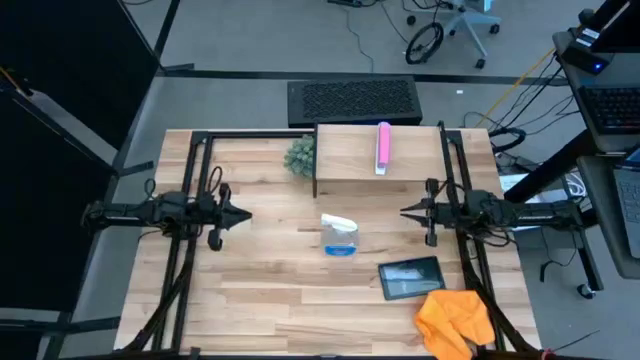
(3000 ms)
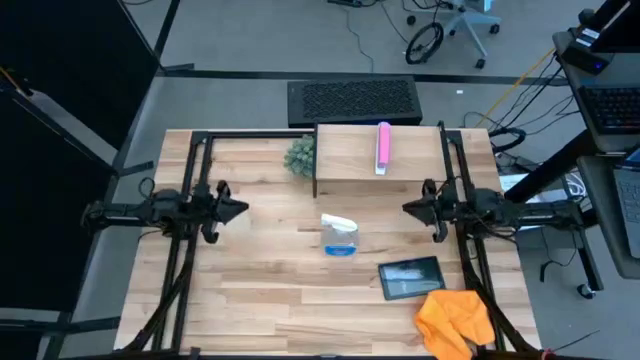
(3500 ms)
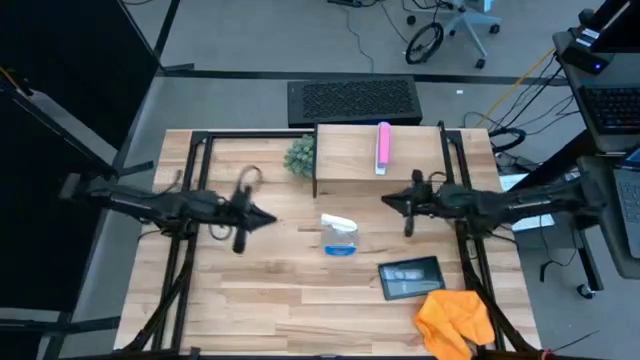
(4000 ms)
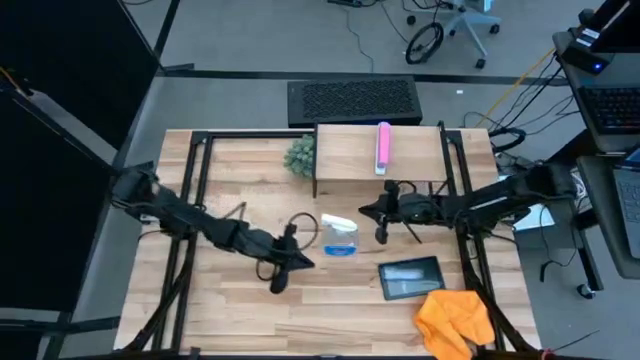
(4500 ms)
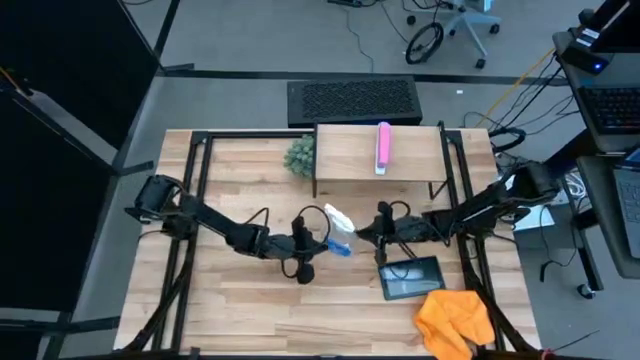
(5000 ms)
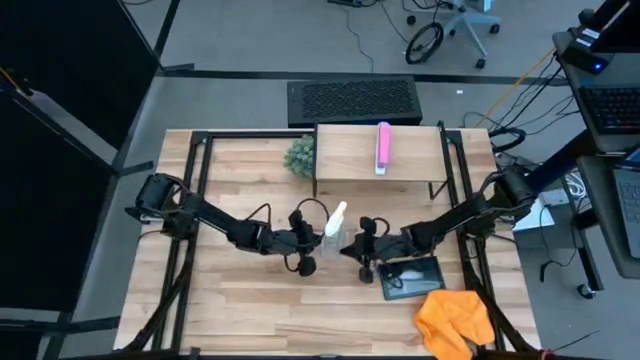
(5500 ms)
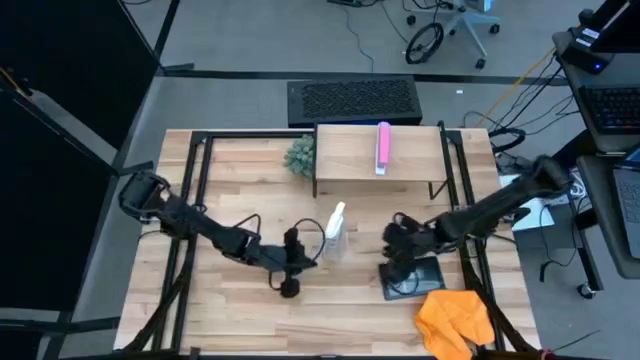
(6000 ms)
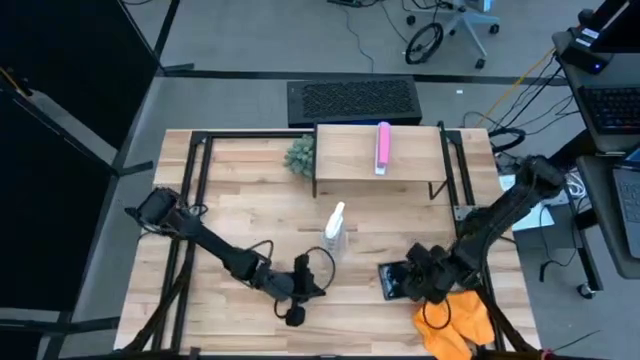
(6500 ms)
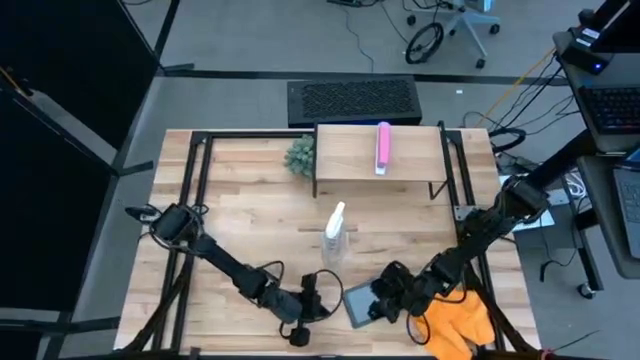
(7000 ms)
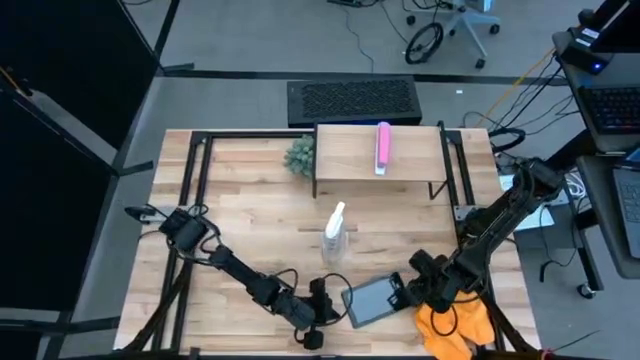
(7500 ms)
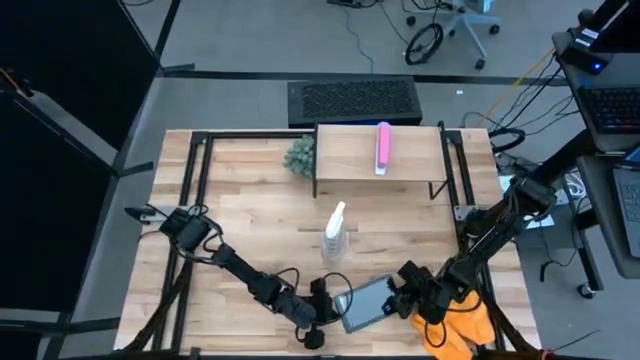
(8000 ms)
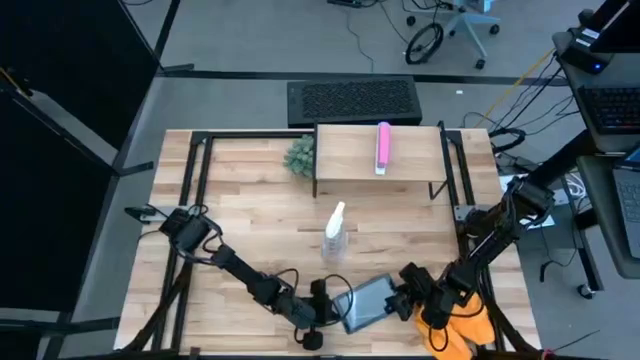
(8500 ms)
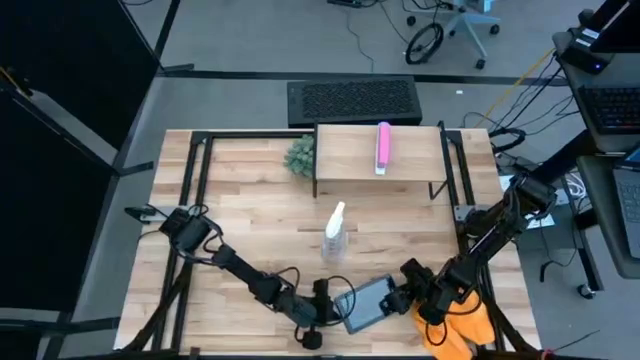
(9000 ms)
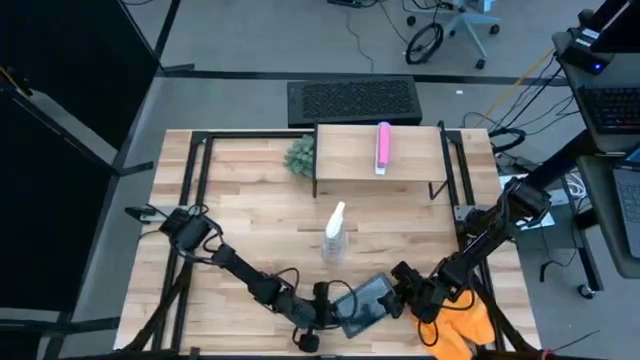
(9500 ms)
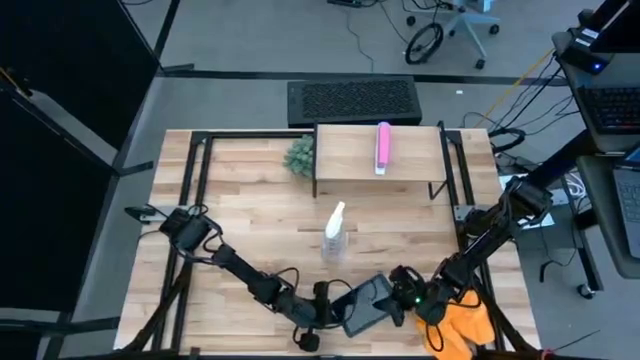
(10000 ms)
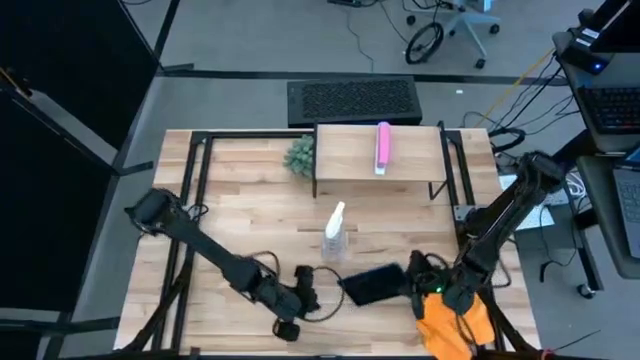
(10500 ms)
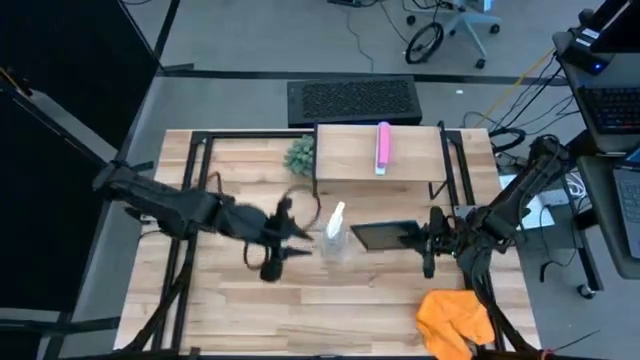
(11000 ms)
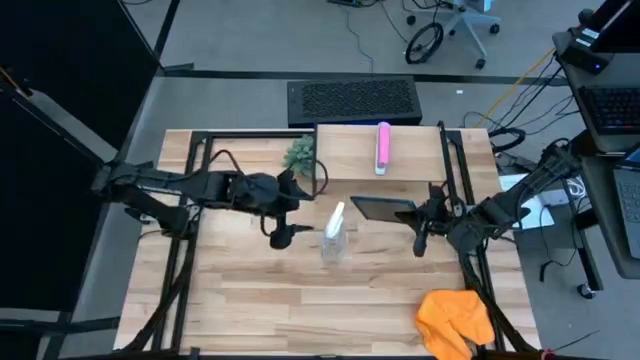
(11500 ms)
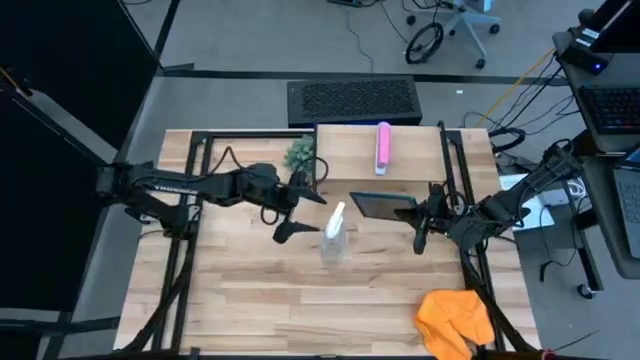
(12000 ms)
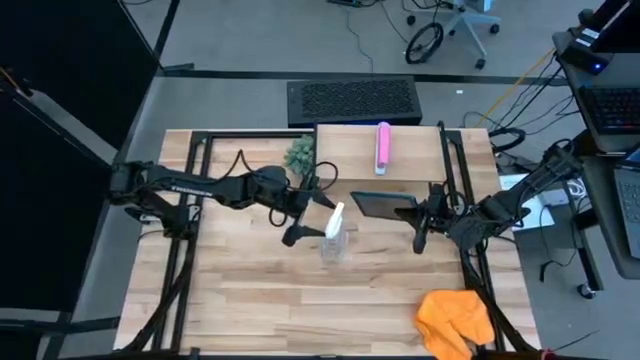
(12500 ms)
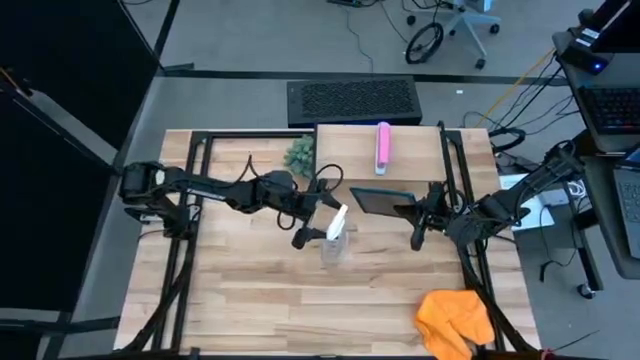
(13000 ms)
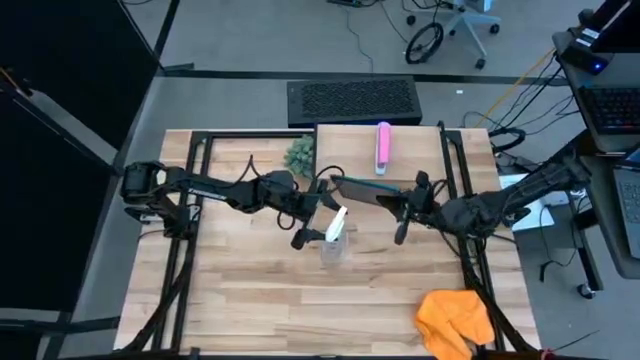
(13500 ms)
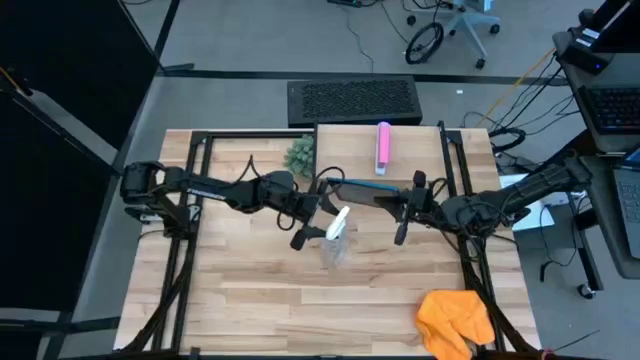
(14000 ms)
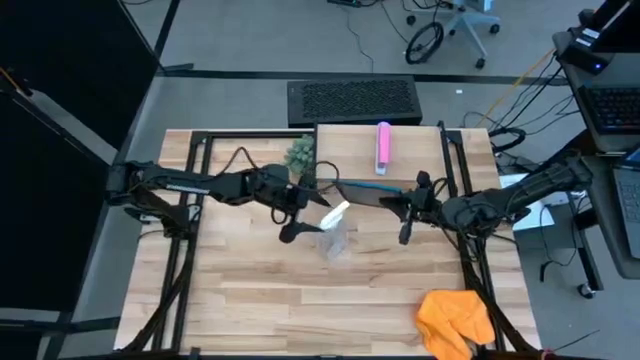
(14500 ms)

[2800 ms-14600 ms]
Task: Apply microfiber cloth
Spray the blue tablet using the spray bottle

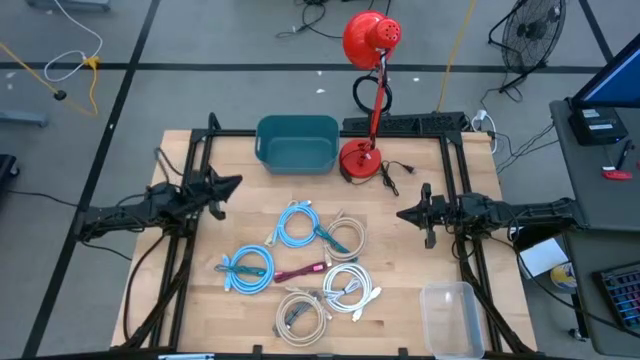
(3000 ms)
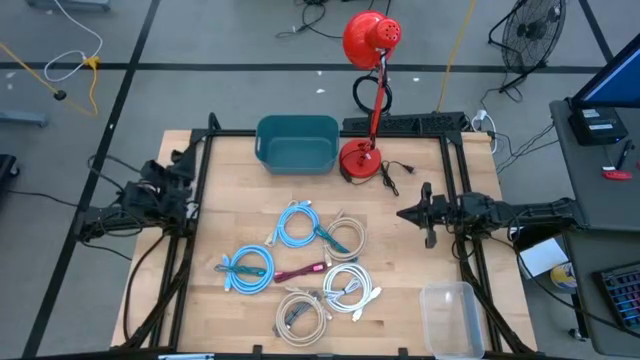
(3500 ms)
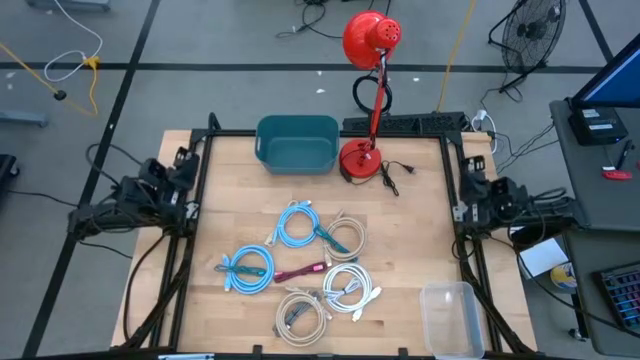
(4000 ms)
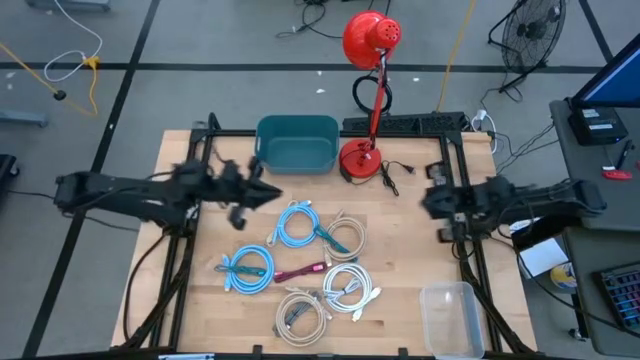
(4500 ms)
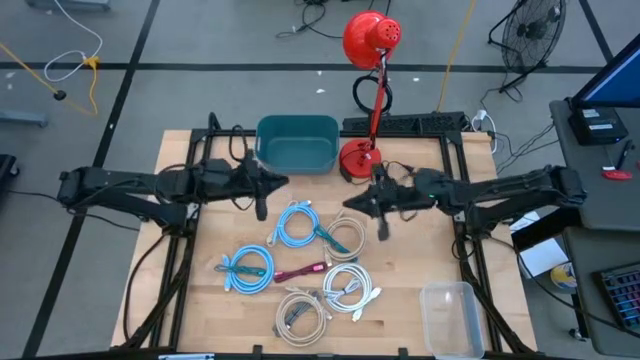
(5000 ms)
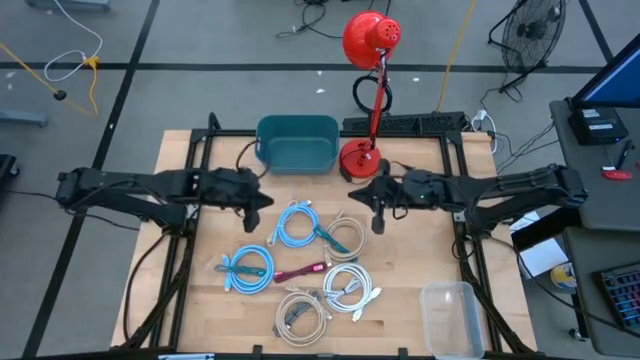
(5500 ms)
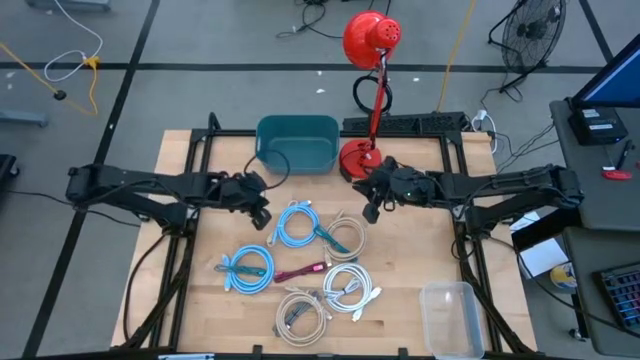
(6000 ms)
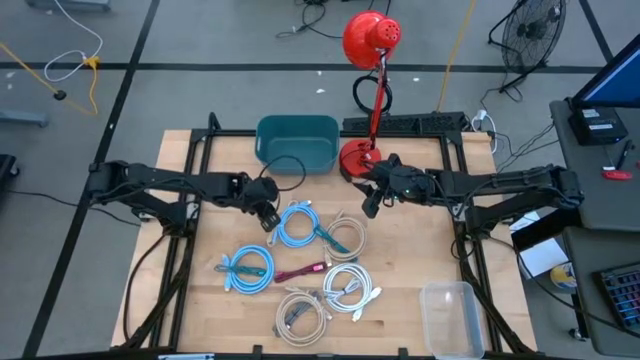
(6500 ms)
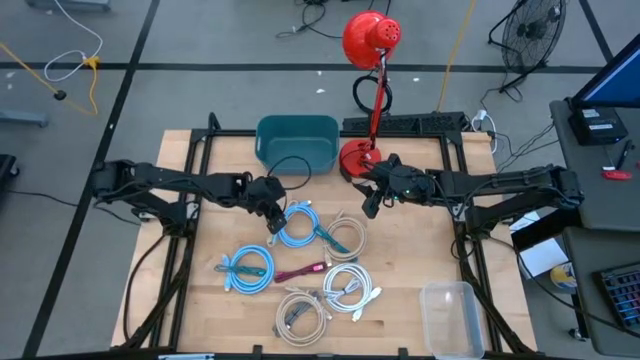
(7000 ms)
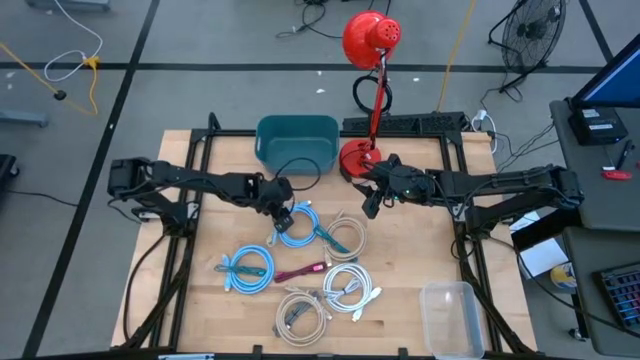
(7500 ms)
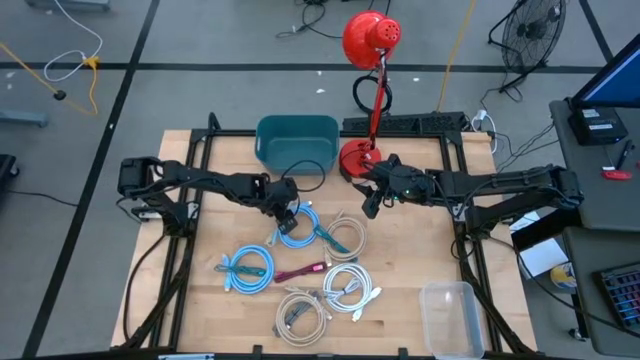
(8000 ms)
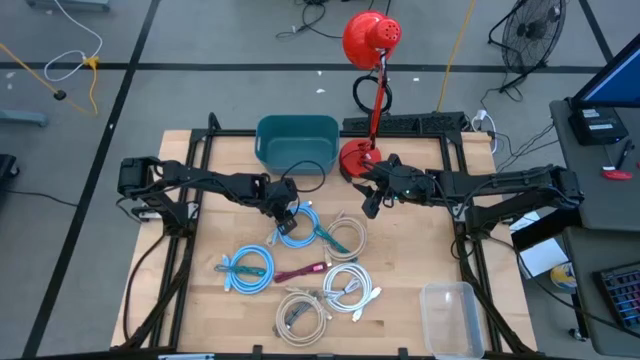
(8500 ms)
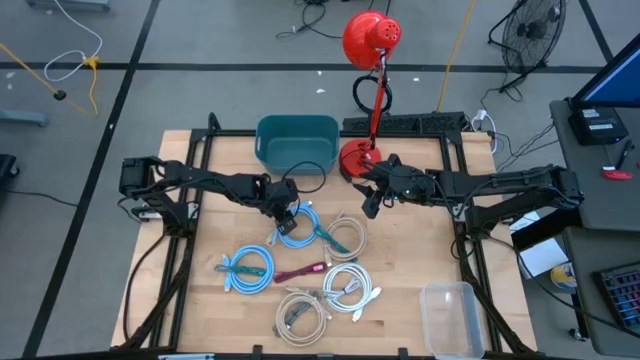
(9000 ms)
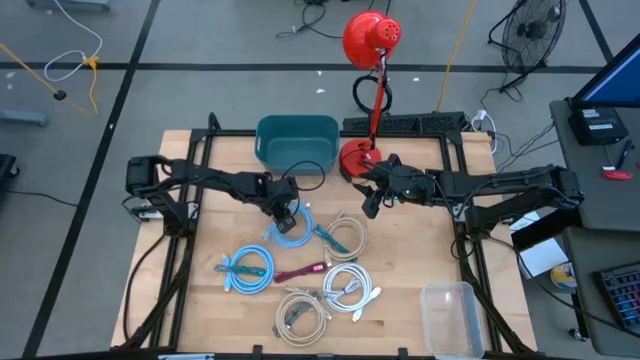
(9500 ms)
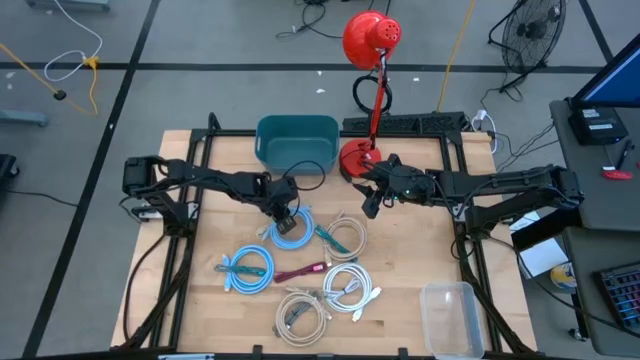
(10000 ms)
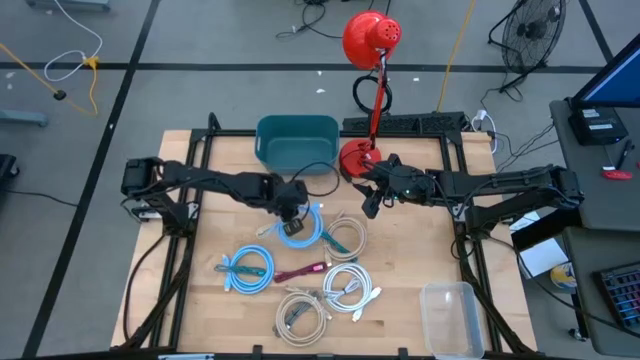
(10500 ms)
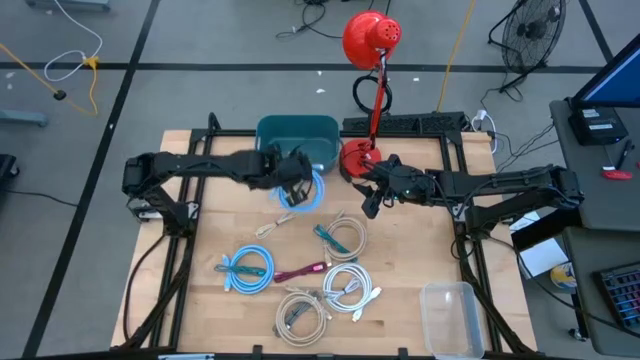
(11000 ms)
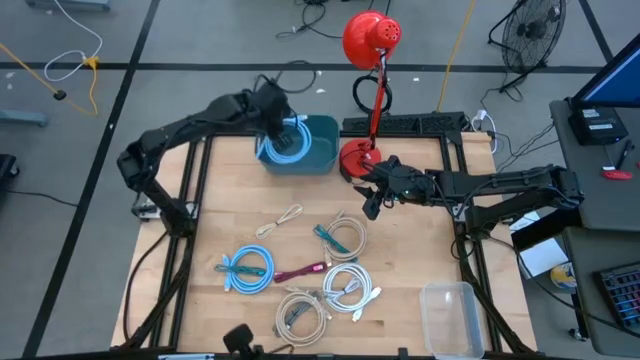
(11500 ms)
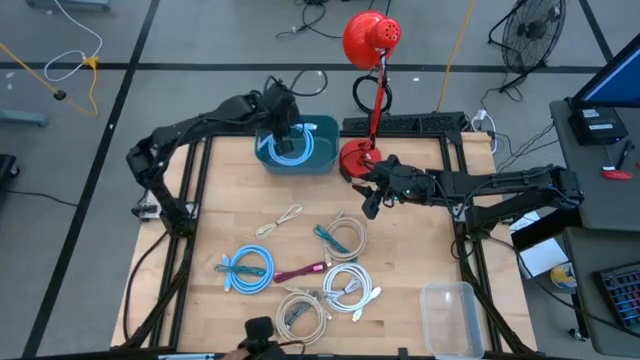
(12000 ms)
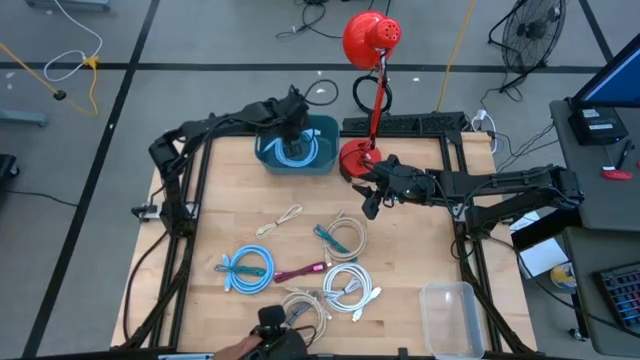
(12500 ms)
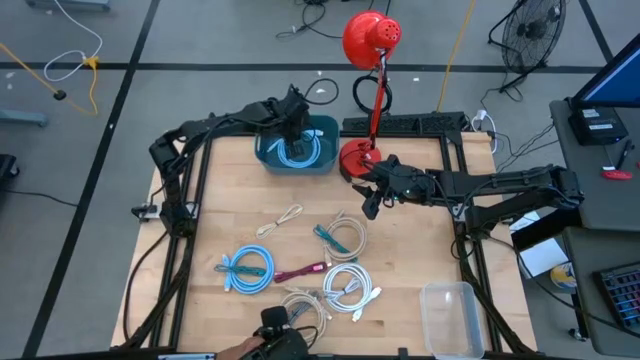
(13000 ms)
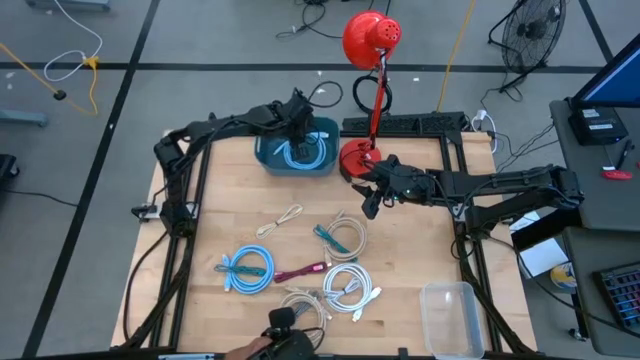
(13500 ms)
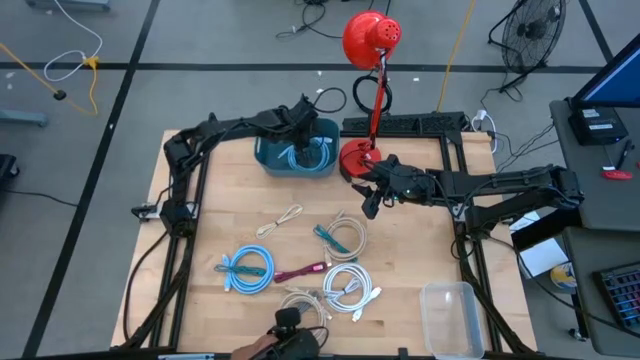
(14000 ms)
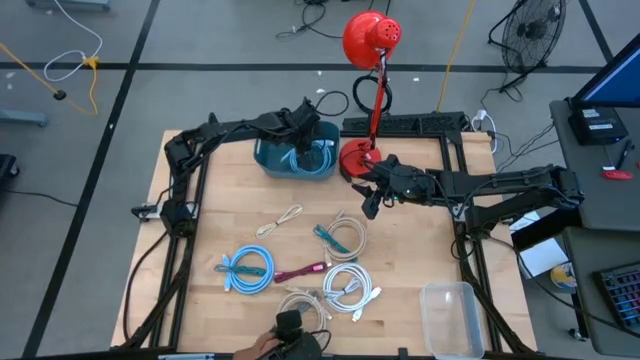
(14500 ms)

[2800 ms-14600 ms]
Task: Pick & Place USB Port
Put the top light blue hdmi cable into the blue bin
